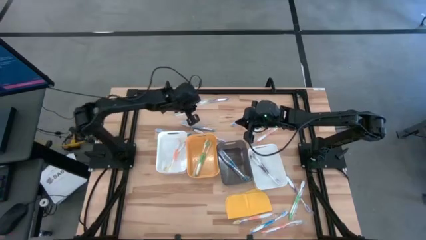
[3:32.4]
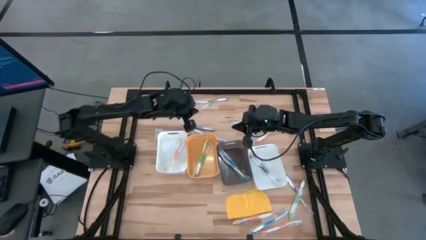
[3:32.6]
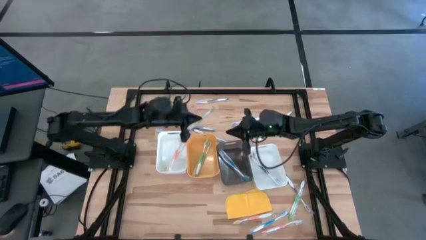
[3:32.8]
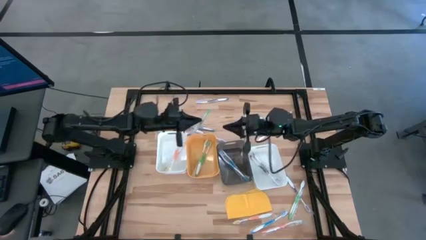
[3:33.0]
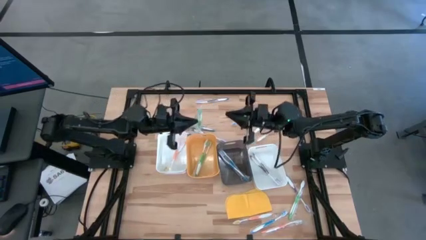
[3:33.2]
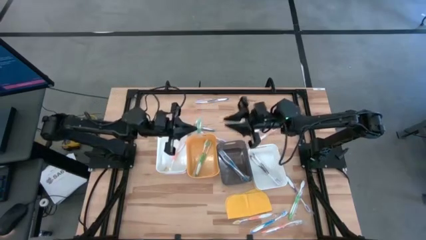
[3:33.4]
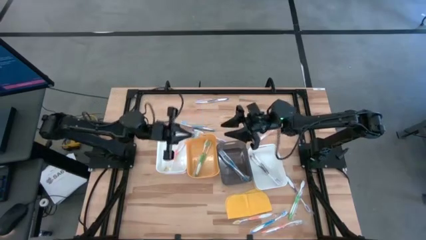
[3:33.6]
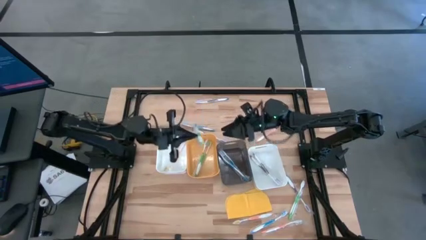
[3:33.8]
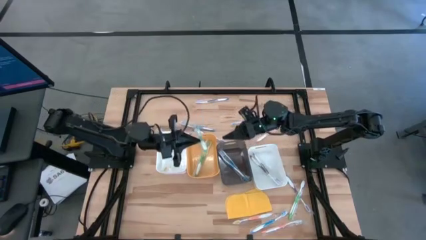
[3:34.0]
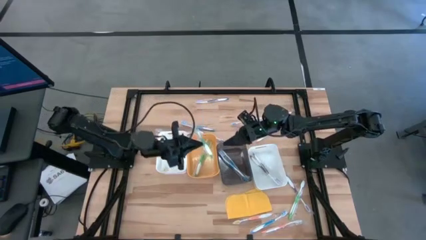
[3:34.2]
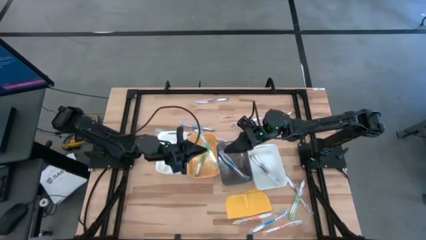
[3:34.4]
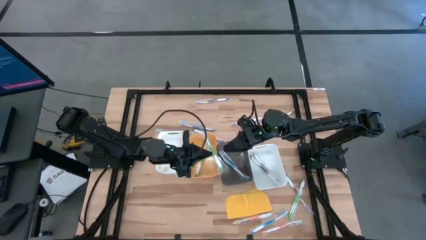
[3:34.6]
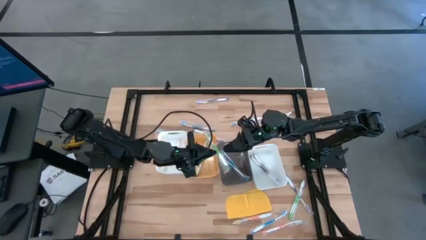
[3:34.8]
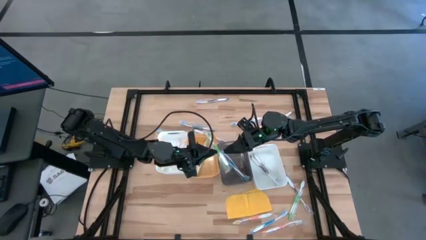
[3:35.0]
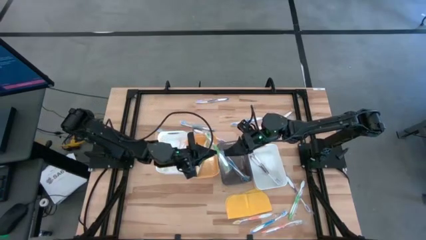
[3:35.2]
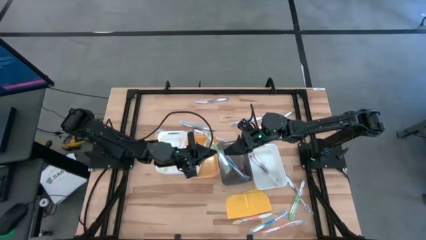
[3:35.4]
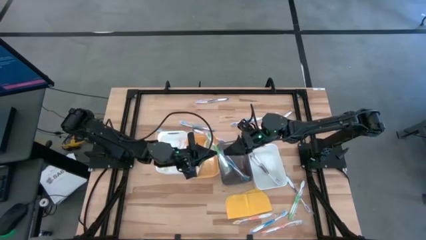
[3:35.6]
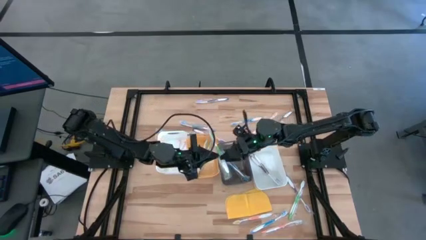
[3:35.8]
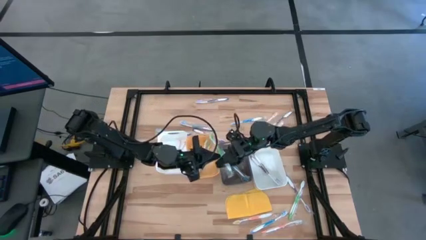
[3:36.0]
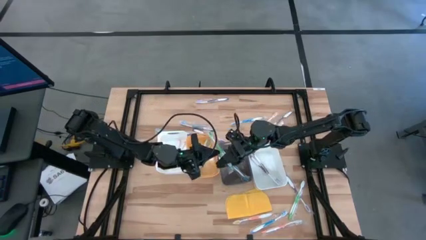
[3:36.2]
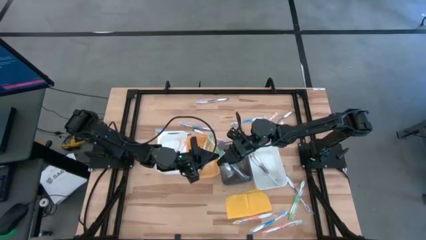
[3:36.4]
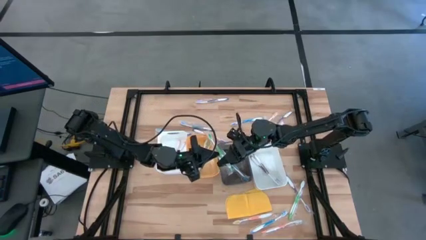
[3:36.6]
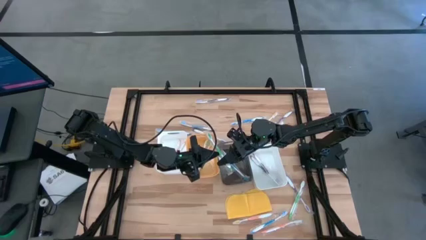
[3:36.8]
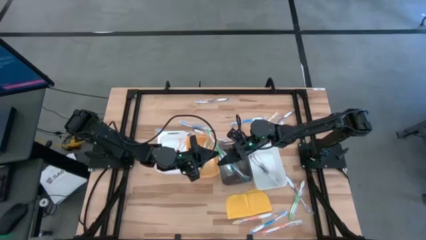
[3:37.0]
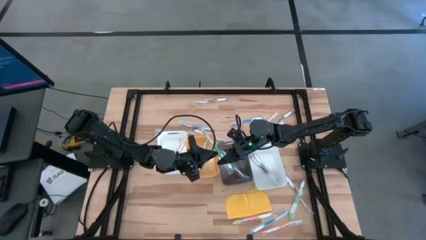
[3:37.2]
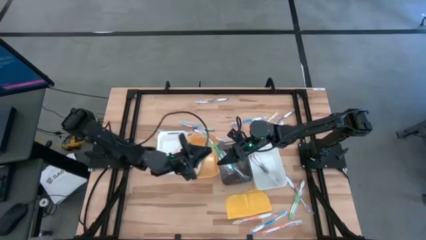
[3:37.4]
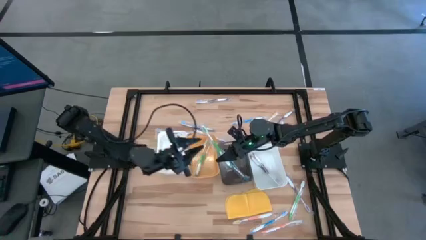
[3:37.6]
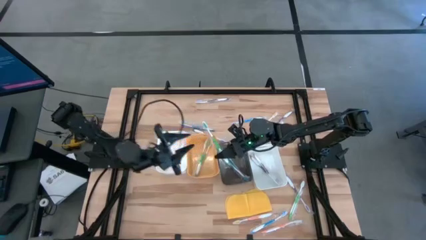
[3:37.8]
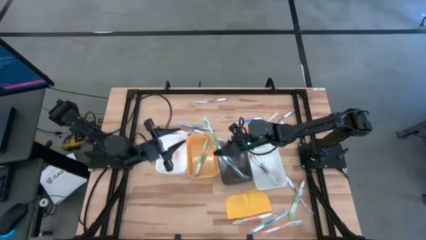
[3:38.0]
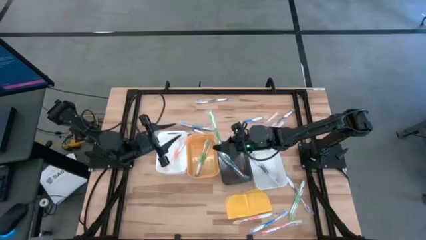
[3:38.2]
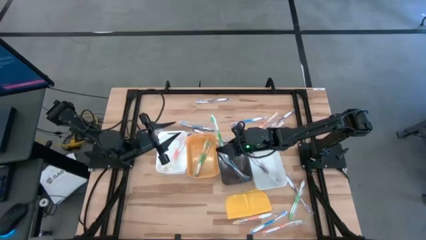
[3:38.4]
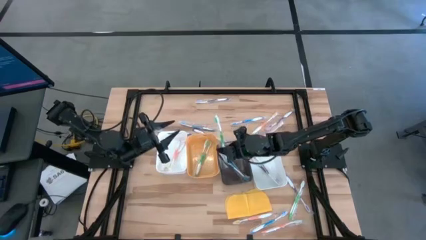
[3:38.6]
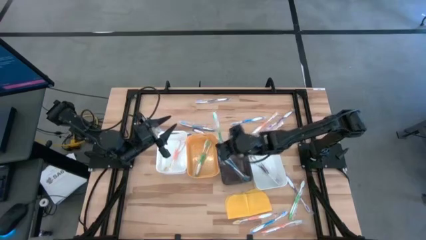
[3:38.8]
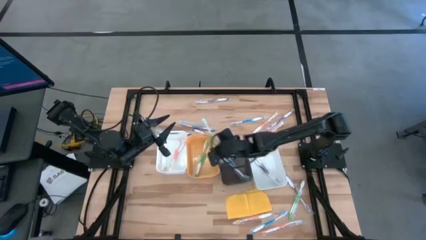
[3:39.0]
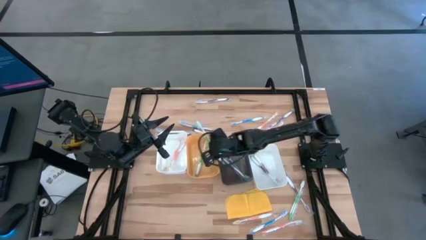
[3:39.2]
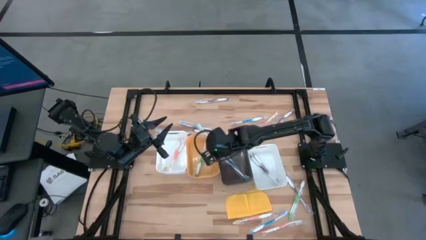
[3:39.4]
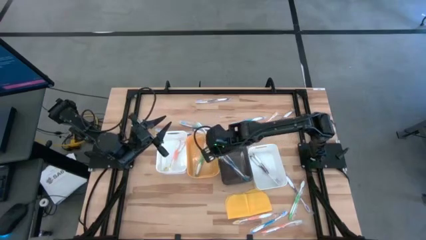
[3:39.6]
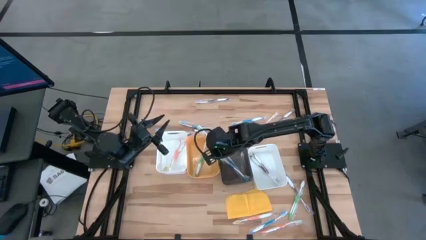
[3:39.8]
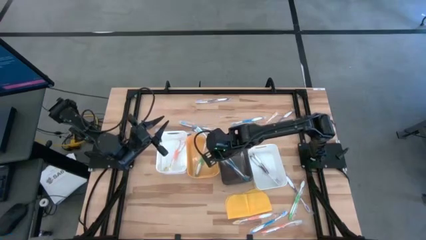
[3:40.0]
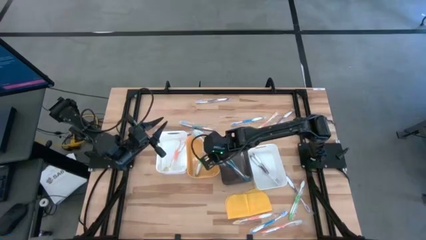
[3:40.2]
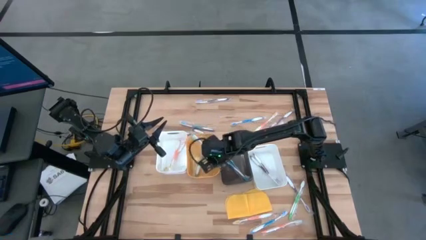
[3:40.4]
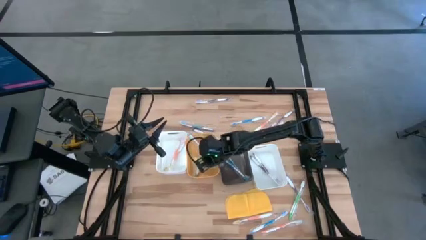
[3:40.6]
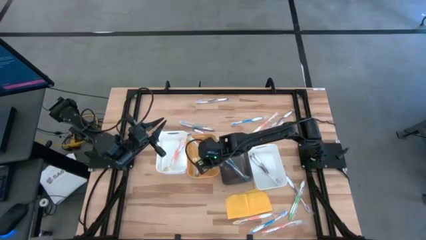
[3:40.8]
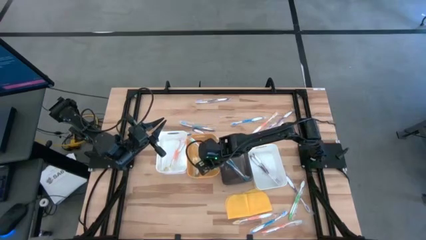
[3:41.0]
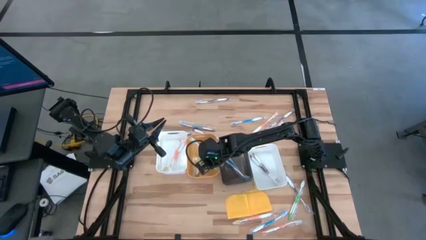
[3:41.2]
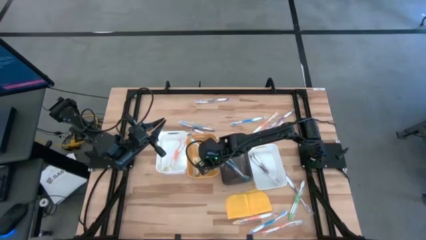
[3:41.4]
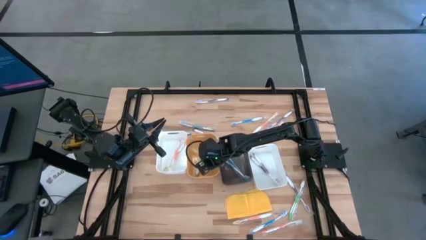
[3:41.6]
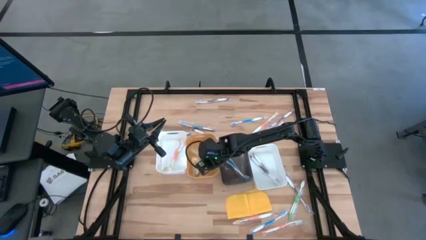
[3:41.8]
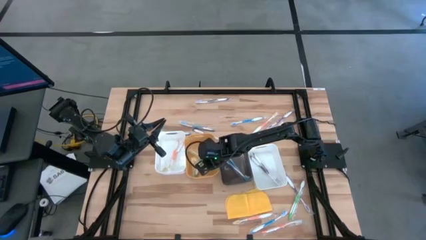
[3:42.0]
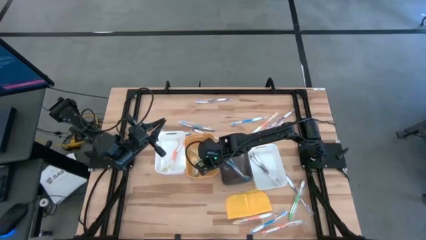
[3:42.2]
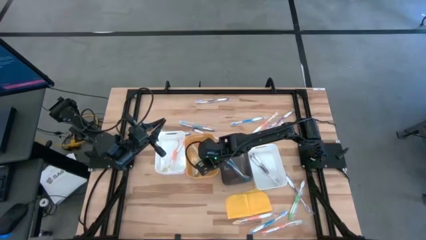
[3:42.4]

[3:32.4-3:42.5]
Task: Pick & Place Toothbrushes
Put the green toothbrush into the yellow bin

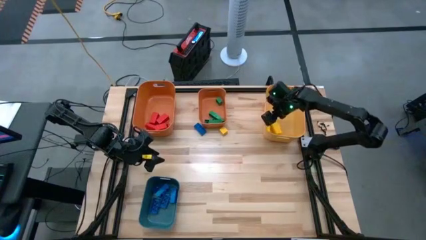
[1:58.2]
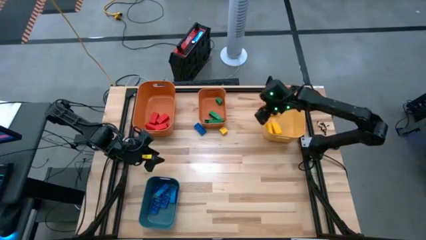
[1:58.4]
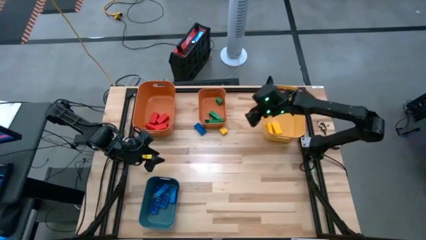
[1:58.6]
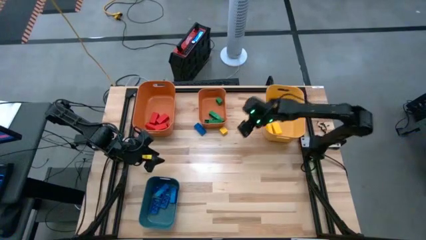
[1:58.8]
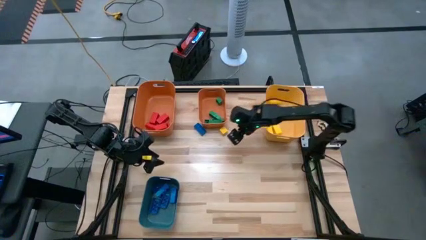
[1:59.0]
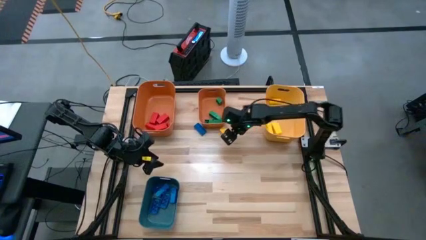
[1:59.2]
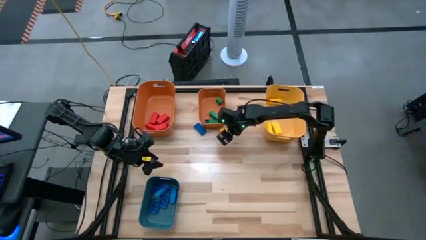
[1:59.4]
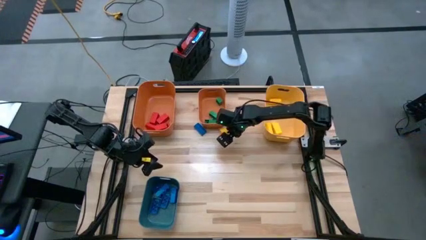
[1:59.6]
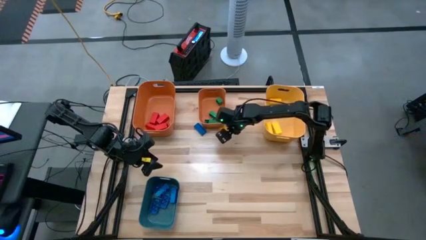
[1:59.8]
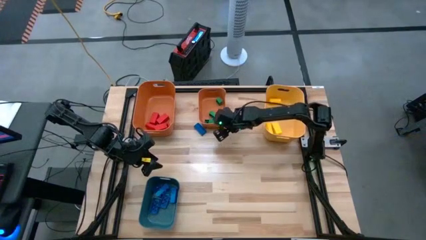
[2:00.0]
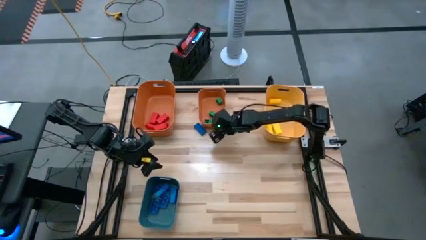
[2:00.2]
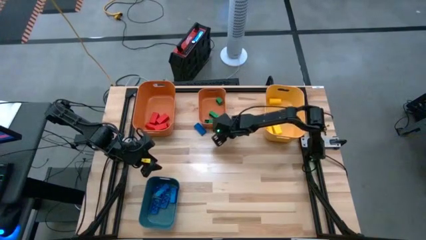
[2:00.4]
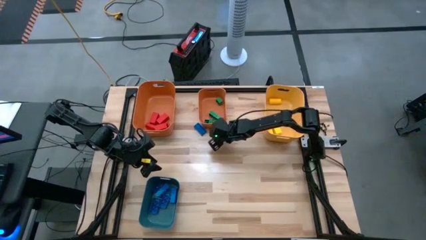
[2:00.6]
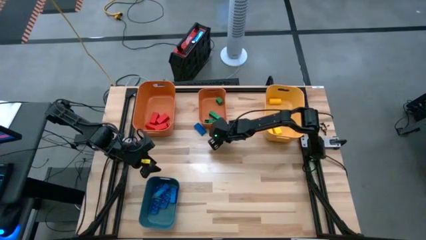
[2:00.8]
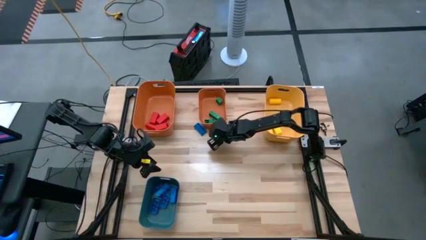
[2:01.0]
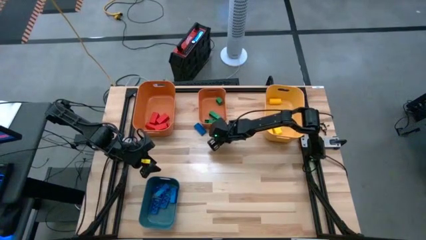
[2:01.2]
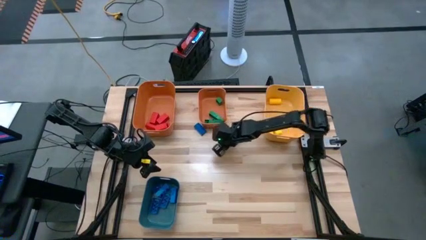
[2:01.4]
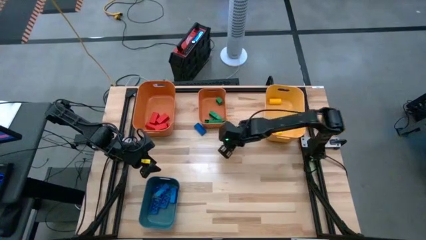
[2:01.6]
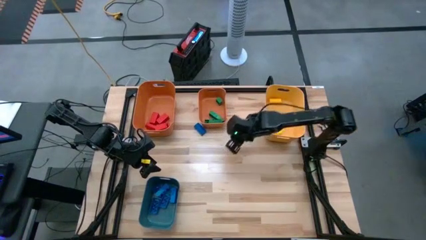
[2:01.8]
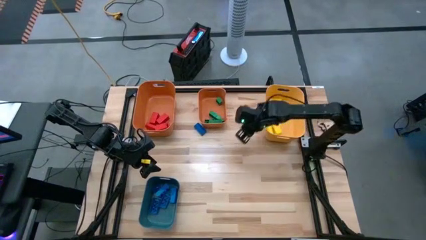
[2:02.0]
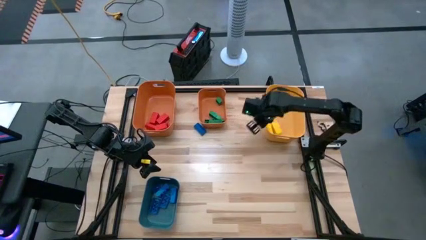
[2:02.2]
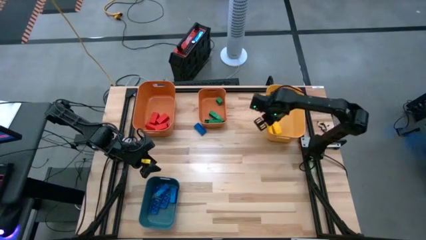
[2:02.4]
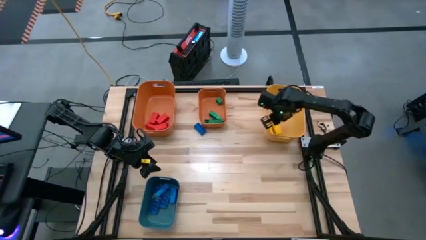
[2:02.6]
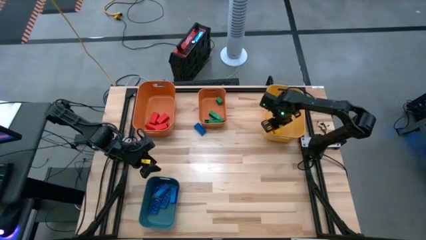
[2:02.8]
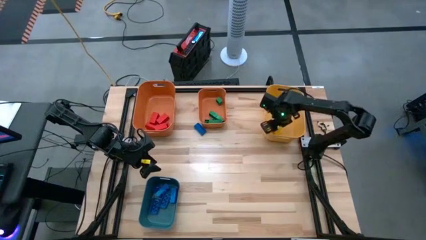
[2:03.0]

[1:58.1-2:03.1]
Task: Sort blocks
Put the yellow block into the yellow bin

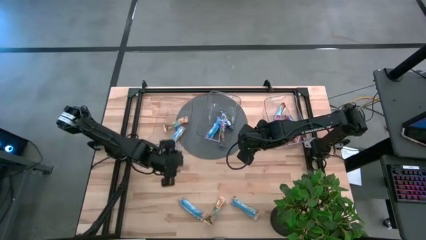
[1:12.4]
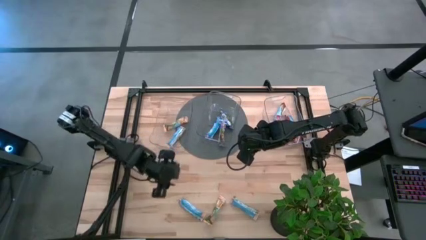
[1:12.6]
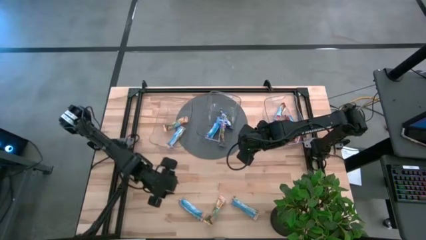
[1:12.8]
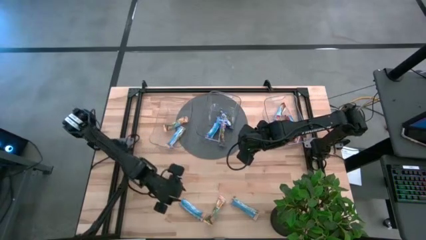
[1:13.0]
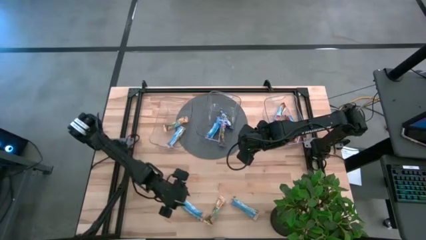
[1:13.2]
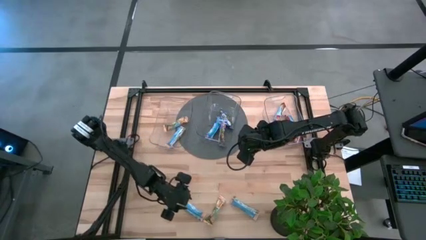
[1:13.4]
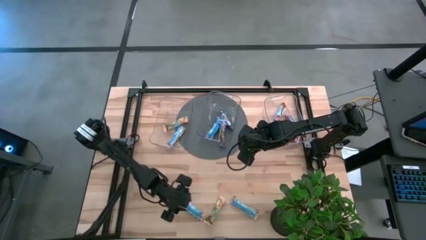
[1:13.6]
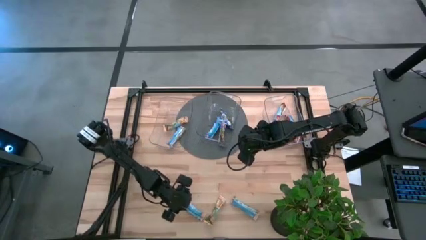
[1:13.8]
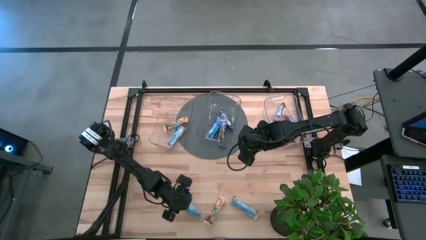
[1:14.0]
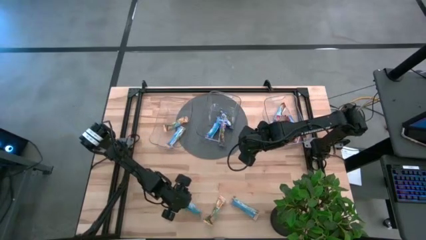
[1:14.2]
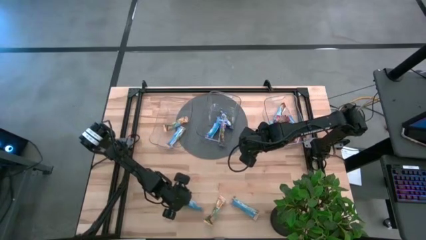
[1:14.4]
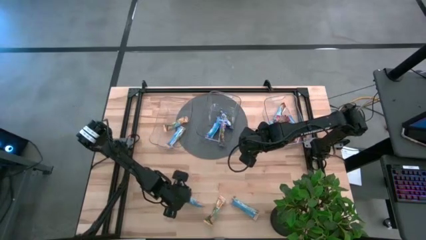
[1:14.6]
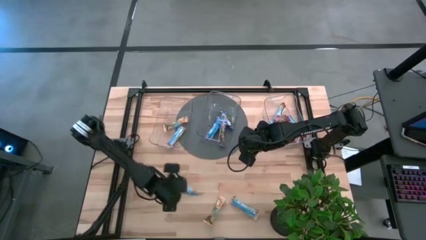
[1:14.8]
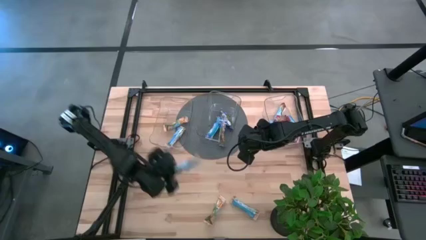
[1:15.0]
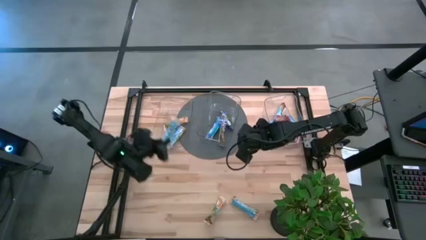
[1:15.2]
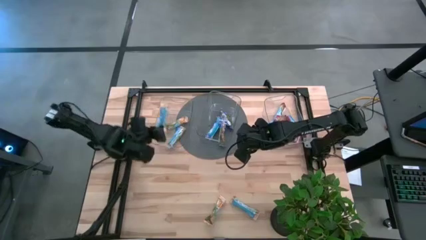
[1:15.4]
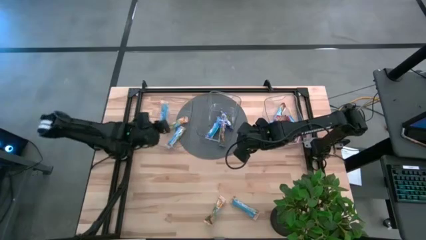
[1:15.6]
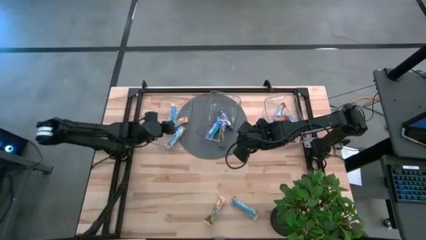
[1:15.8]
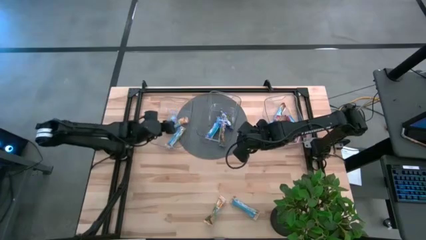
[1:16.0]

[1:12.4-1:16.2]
Task: Pick and place Granola Bars by type
Put the yellow granola bar into the left transparent bin
